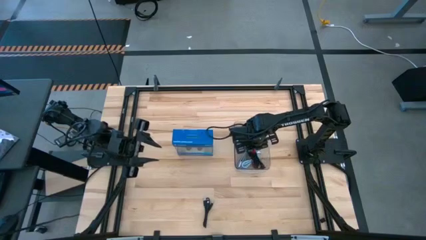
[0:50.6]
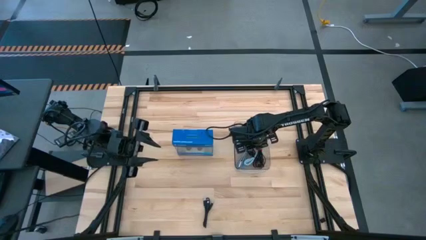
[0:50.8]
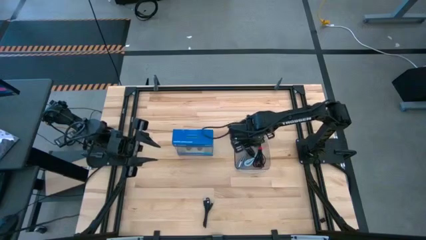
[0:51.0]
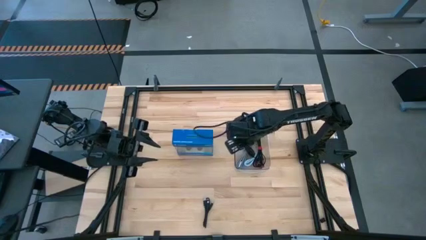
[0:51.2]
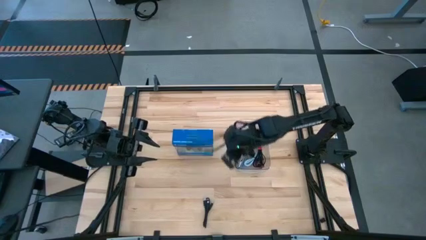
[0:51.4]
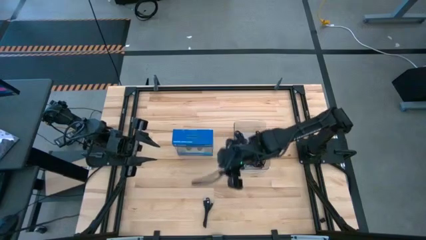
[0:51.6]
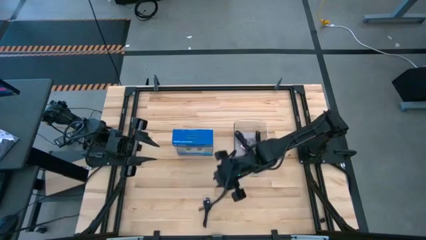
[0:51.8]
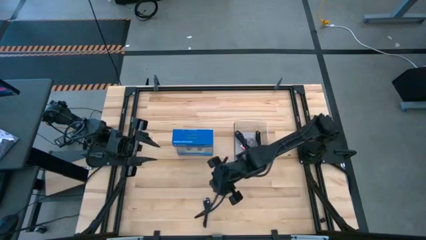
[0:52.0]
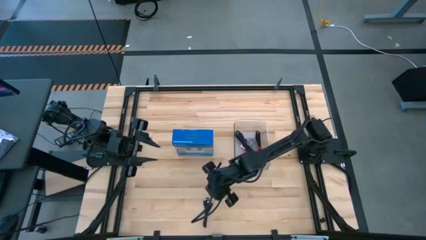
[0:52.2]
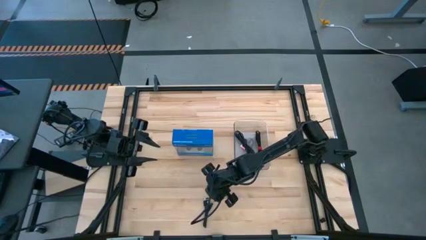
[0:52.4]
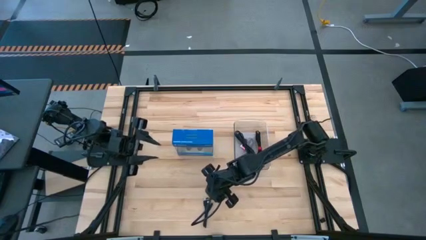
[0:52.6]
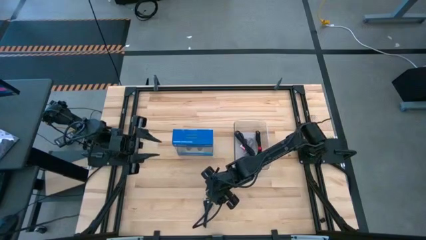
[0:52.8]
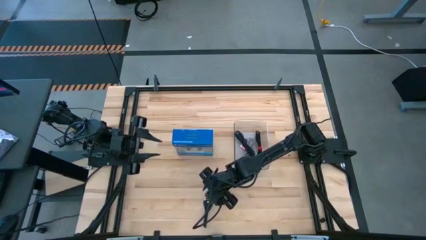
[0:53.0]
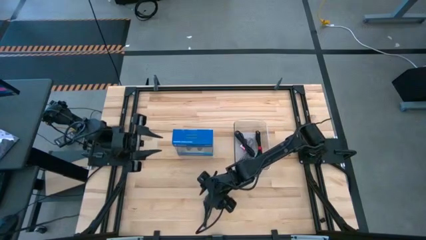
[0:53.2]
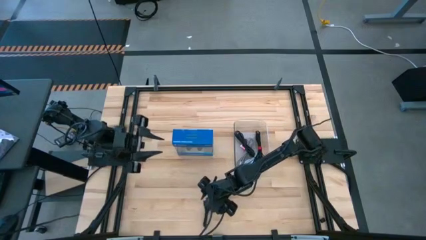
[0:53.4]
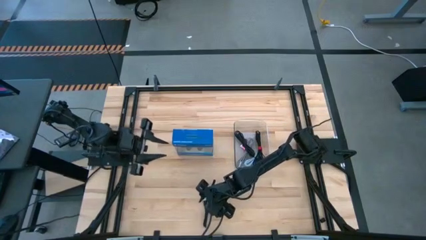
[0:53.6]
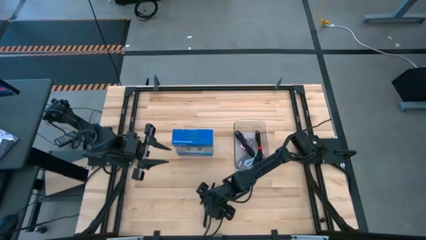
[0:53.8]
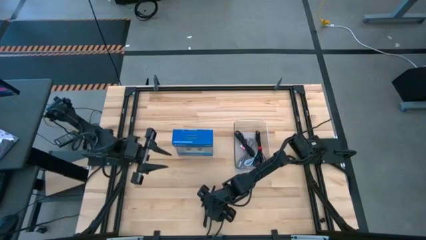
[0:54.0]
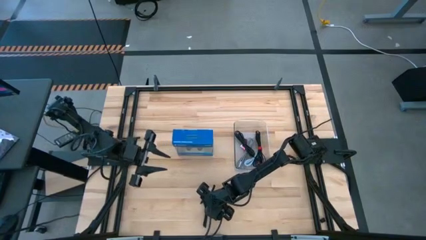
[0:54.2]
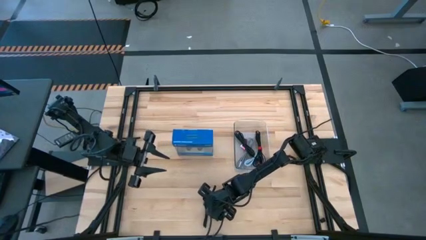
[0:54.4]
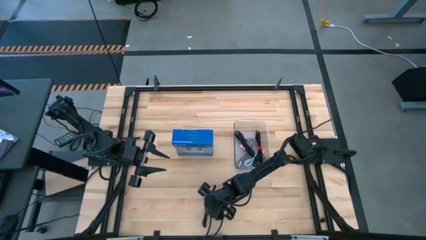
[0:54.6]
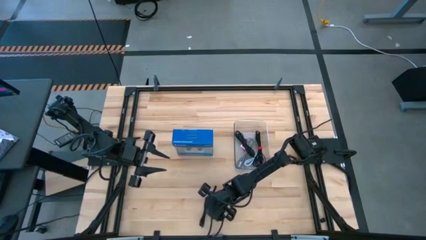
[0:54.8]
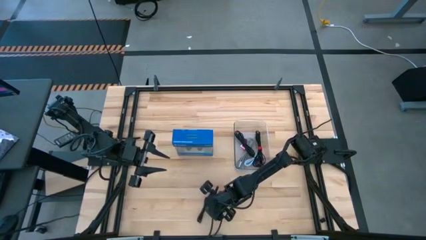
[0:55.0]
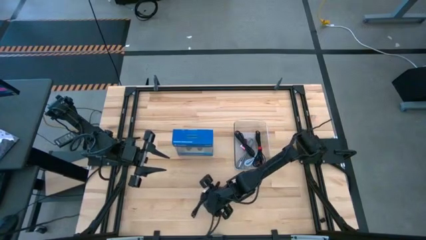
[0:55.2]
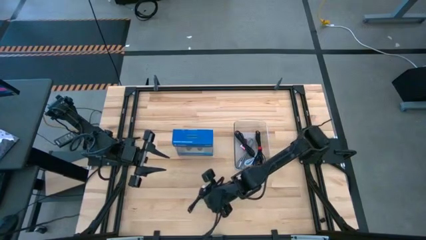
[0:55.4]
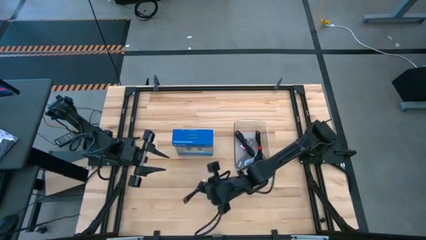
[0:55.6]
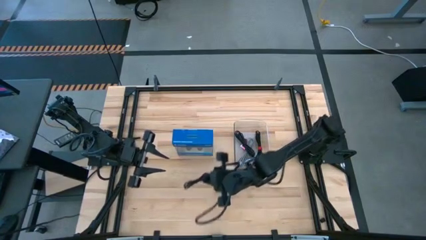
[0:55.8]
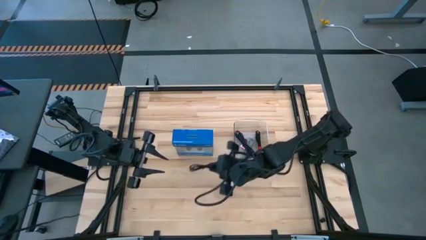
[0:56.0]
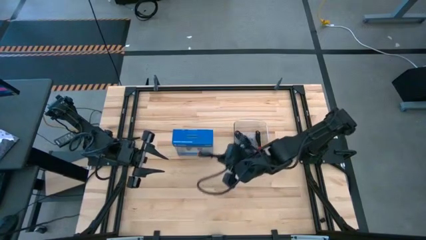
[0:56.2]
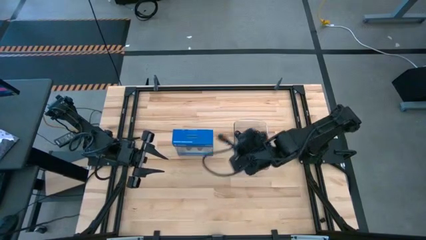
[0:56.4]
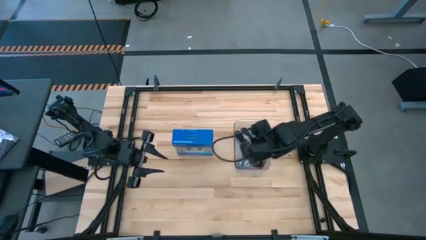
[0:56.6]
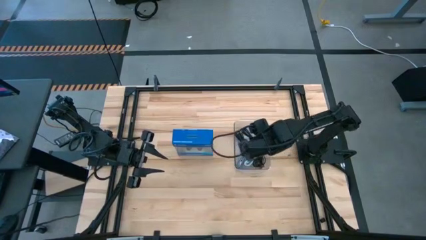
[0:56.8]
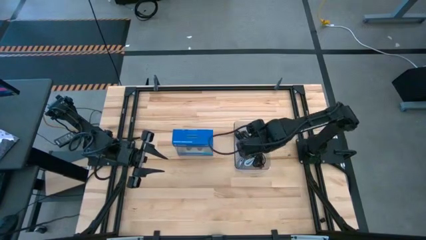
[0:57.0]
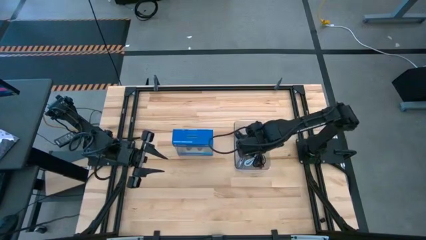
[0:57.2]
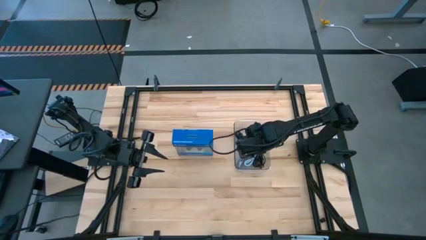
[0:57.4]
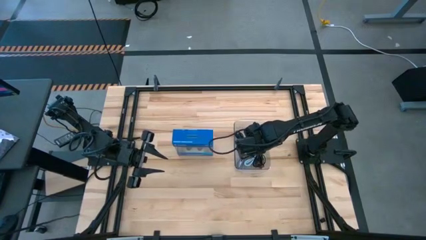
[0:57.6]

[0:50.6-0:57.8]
Task: Pick and place USB-C Cables
Put the black charger cable into the transparent bin

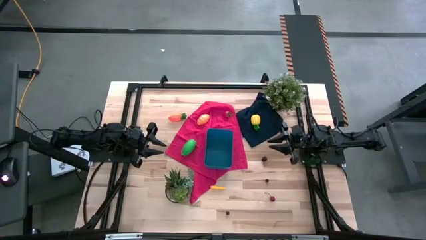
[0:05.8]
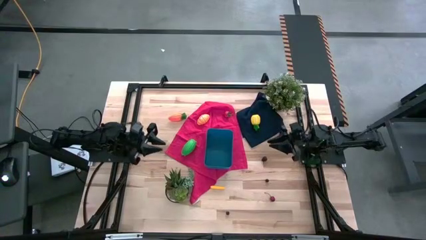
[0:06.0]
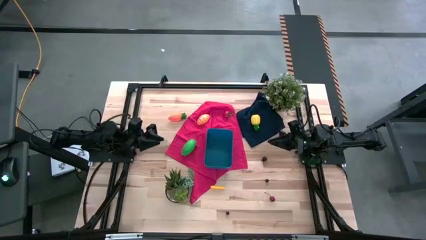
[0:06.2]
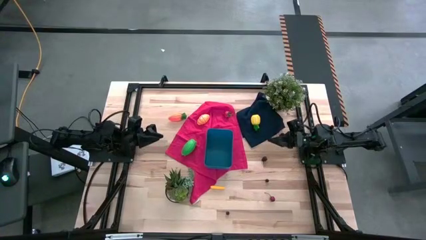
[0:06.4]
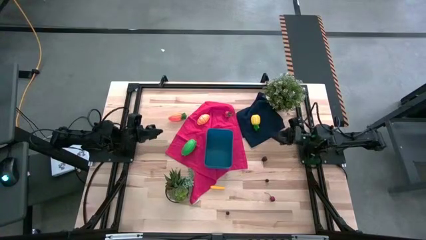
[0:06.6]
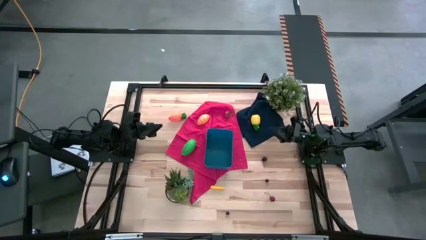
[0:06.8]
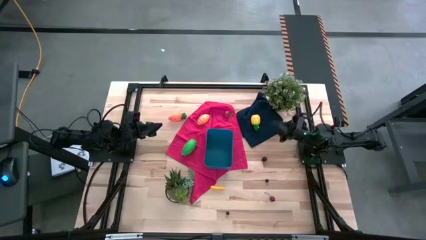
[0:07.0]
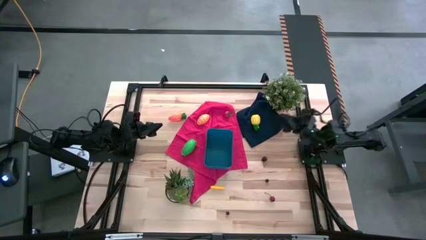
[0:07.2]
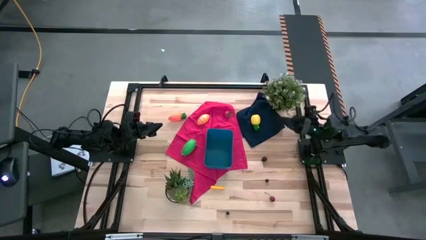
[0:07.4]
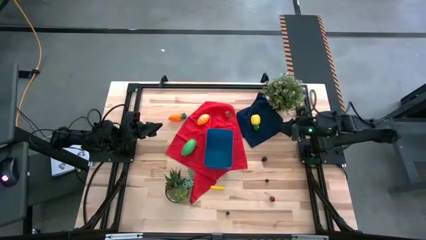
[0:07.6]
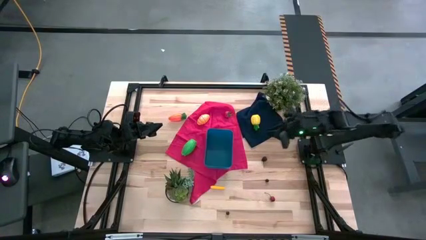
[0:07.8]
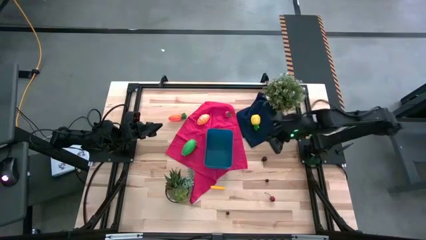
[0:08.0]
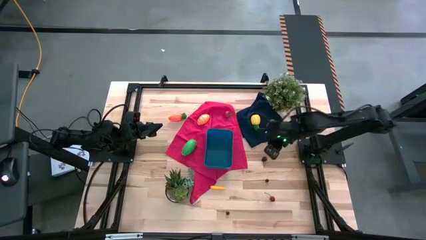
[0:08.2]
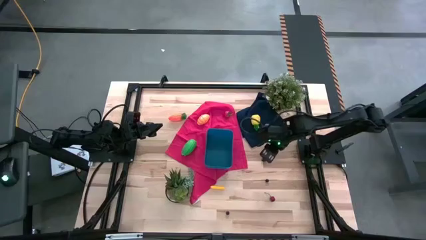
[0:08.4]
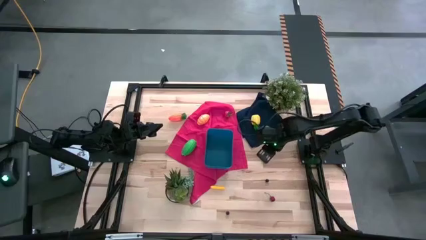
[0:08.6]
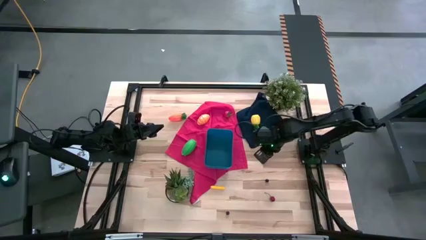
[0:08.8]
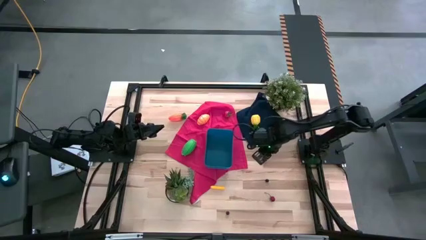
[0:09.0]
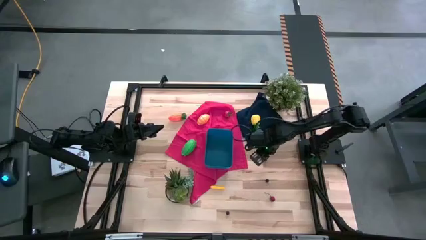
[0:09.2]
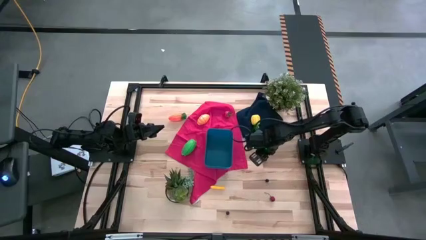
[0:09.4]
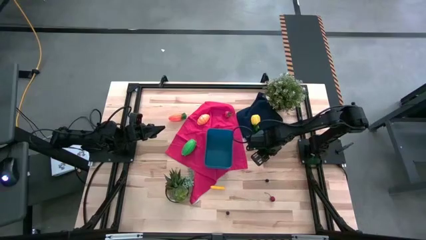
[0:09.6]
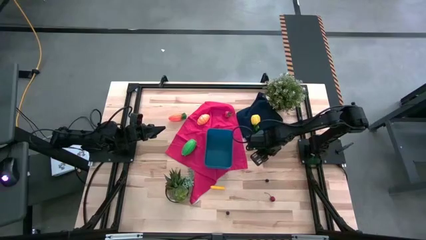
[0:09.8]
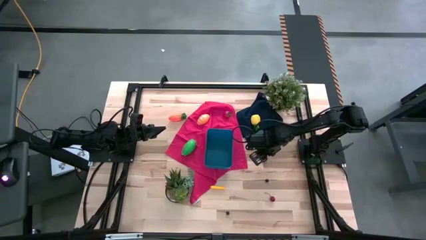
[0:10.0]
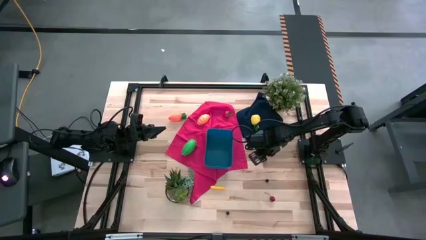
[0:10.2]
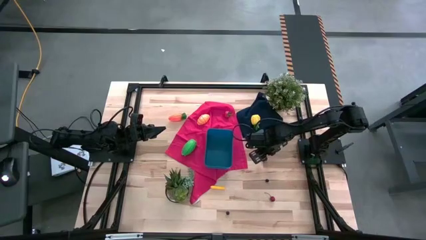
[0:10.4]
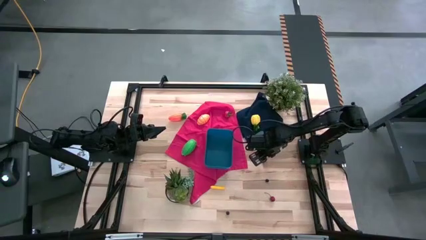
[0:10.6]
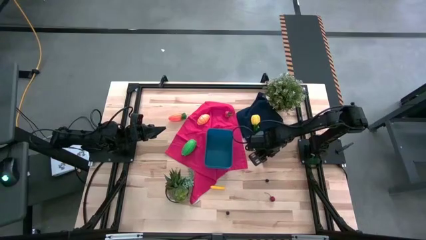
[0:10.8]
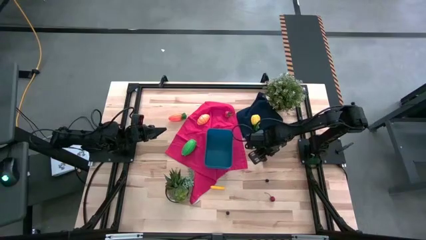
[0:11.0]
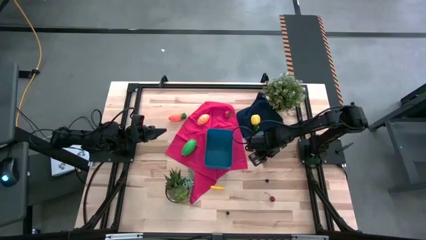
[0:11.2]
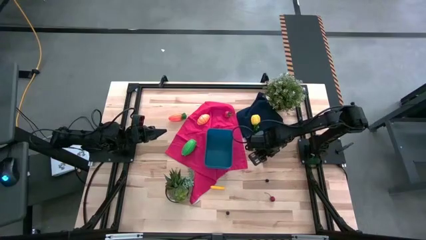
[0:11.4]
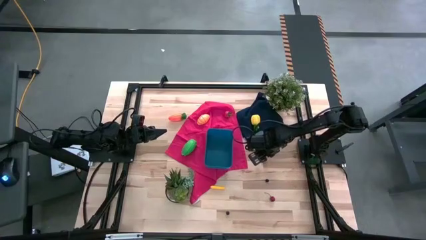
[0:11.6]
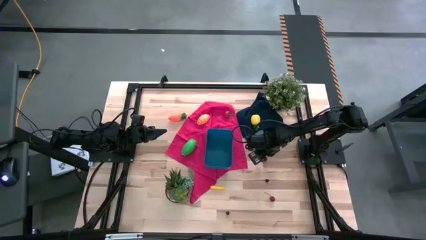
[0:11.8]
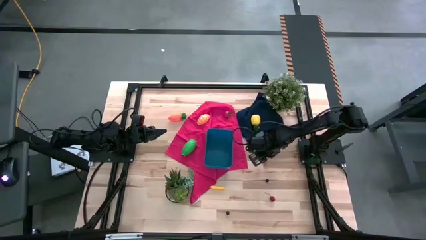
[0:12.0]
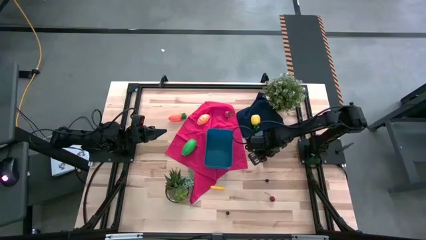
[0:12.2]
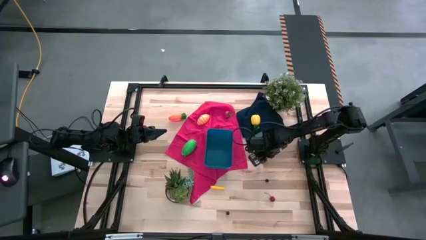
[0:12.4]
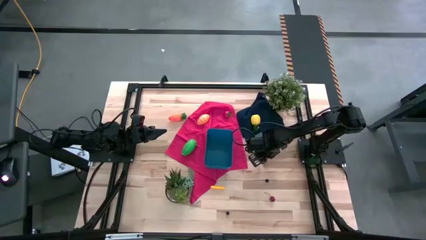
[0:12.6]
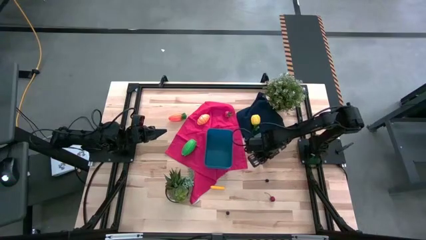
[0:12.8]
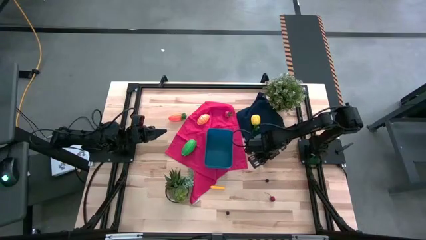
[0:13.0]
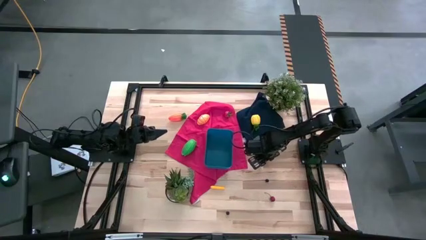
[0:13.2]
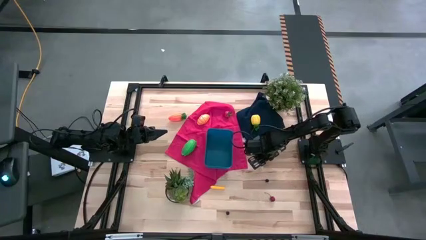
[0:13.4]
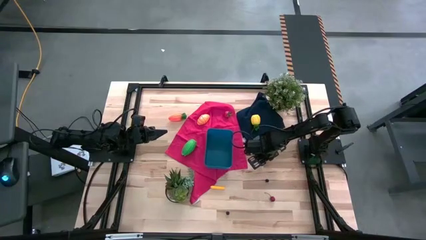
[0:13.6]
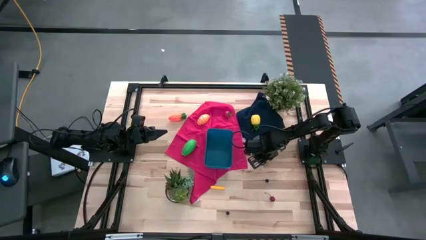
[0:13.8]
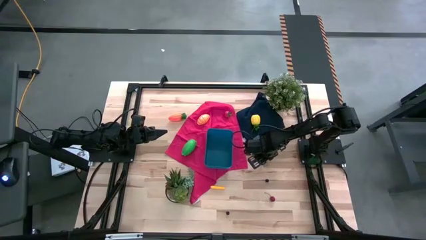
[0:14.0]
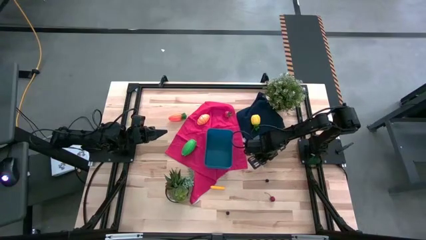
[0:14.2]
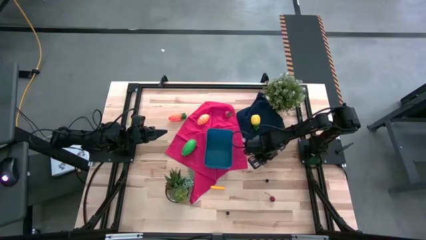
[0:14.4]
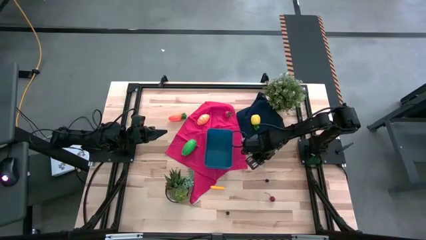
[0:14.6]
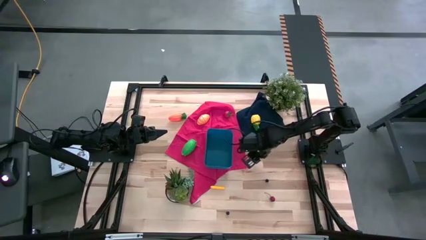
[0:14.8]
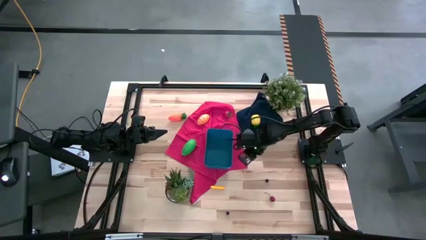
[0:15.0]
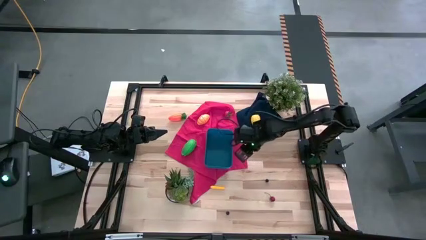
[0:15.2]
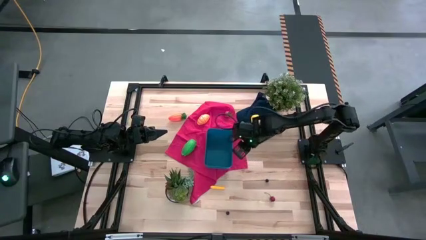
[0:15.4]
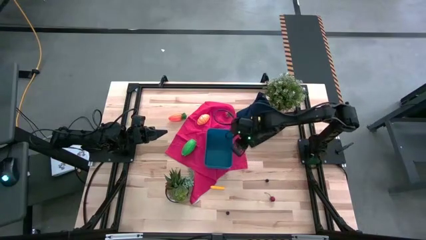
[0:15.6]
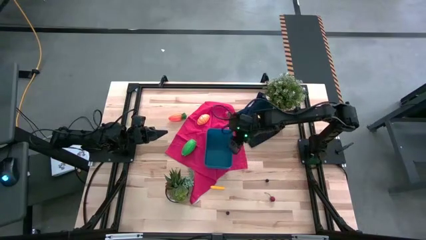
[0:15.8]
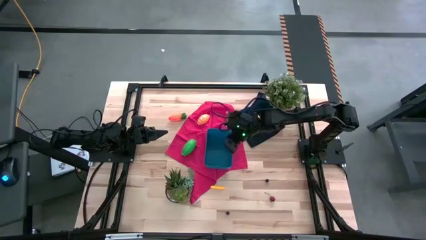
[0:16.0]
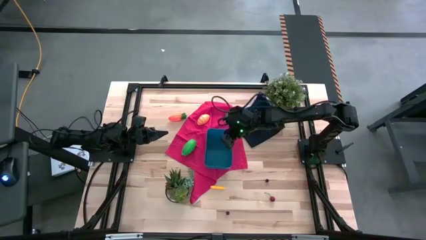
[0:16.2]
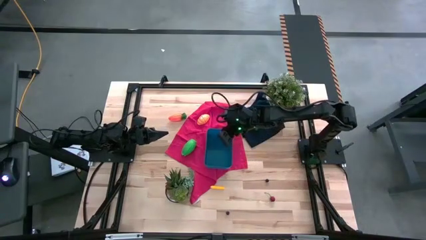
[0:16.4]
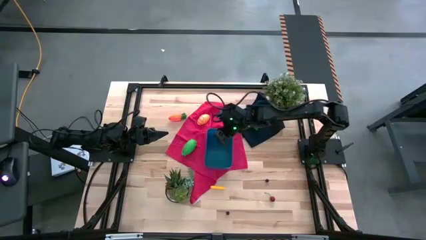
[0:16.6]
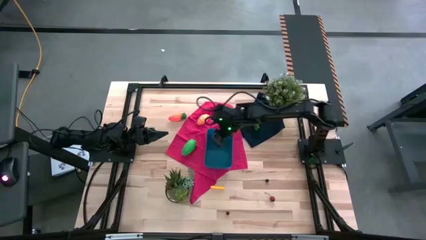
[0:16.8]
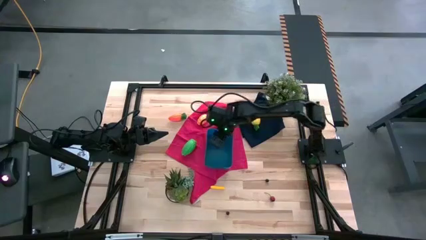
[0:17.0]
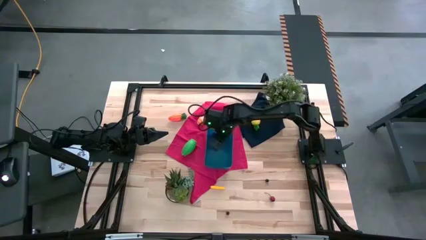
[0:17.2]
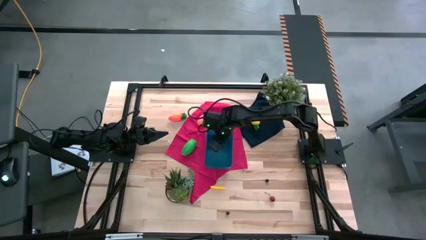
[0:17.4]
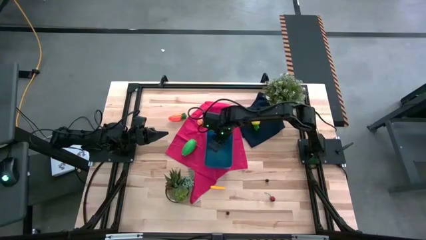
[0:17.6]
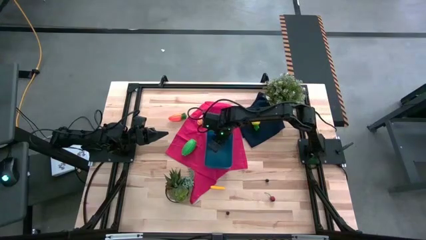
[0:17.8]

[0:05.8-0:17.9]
Task: Pick and placing Produce into tupperware
Put the blackberry into the blue bin
